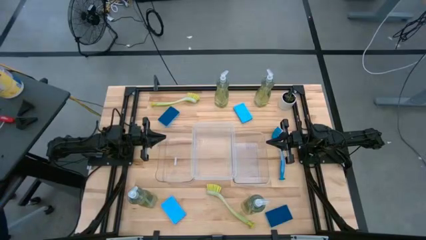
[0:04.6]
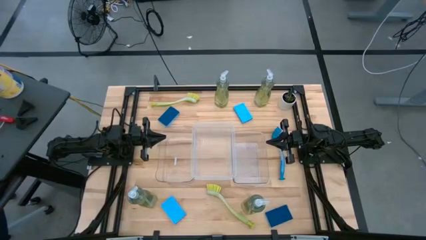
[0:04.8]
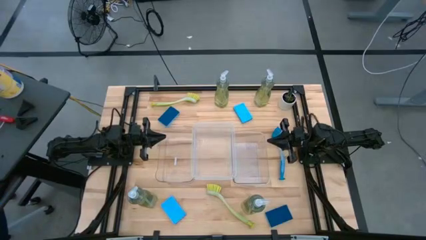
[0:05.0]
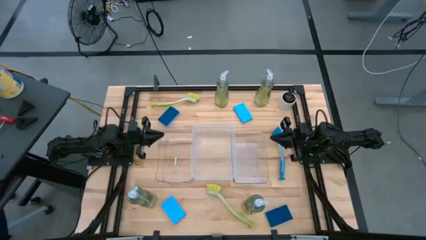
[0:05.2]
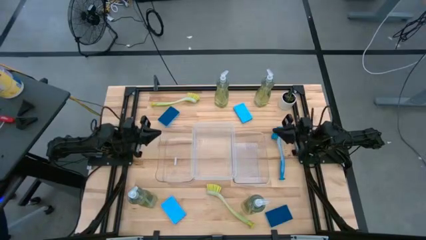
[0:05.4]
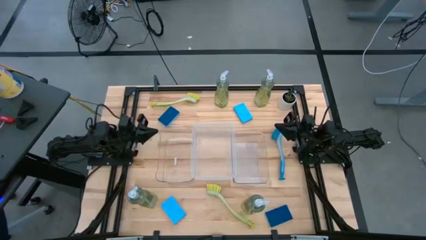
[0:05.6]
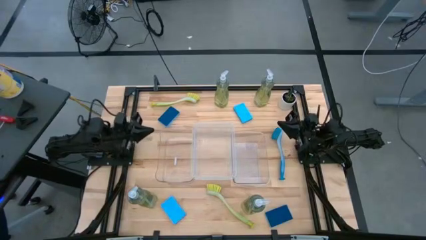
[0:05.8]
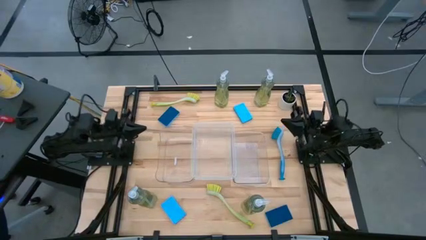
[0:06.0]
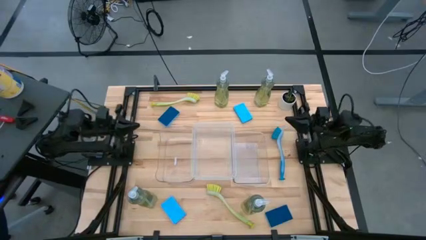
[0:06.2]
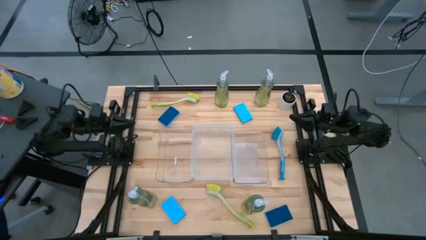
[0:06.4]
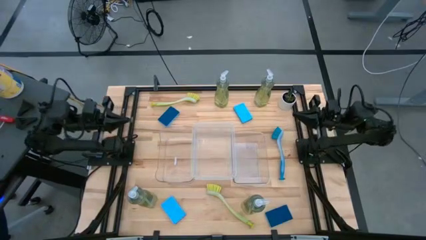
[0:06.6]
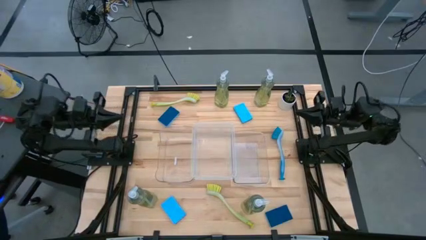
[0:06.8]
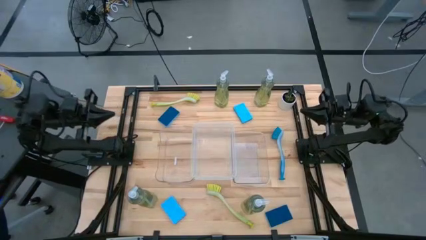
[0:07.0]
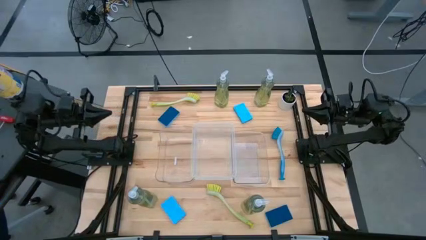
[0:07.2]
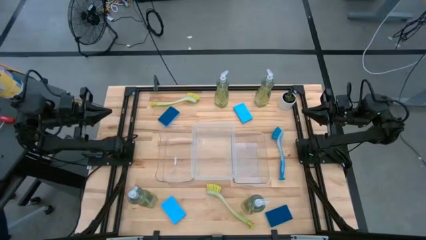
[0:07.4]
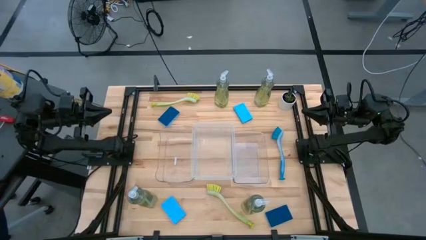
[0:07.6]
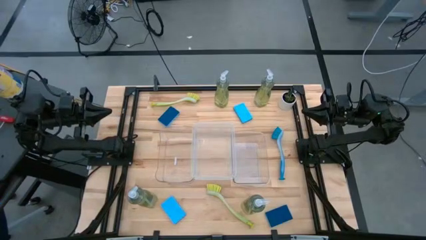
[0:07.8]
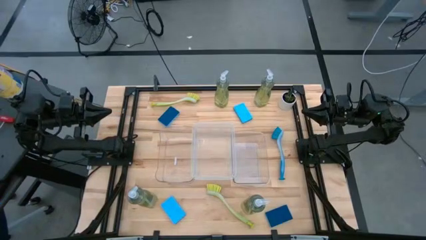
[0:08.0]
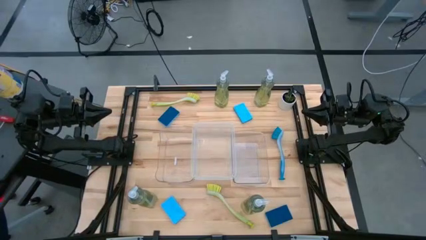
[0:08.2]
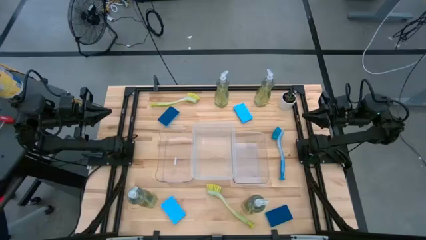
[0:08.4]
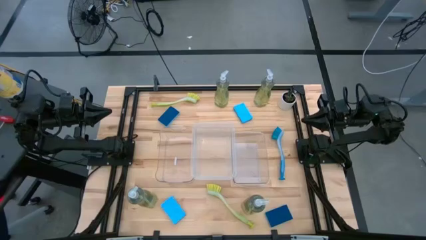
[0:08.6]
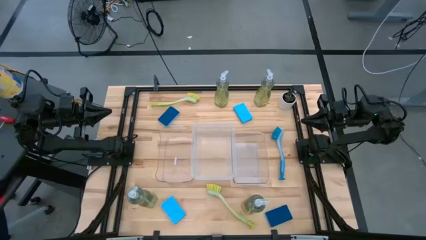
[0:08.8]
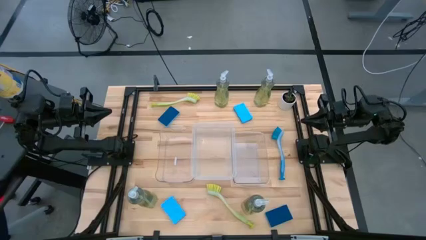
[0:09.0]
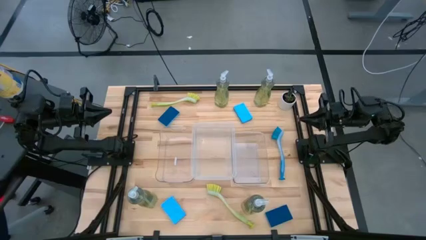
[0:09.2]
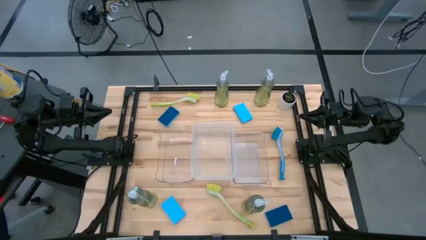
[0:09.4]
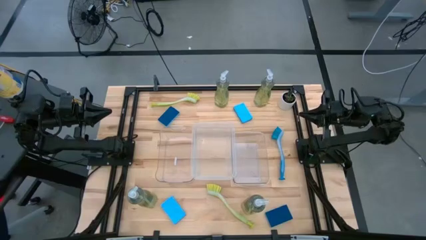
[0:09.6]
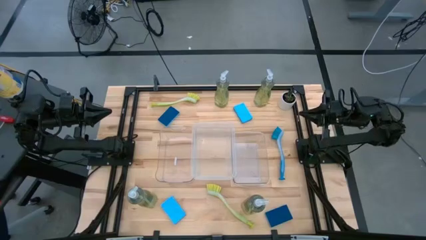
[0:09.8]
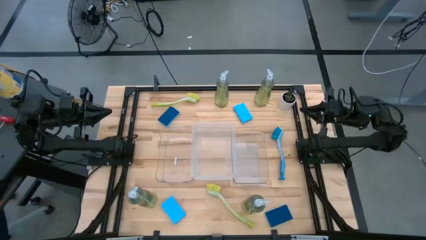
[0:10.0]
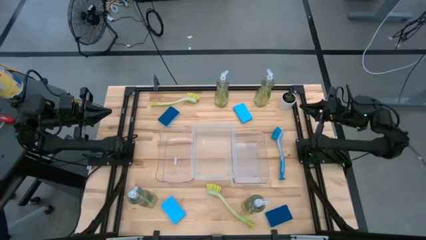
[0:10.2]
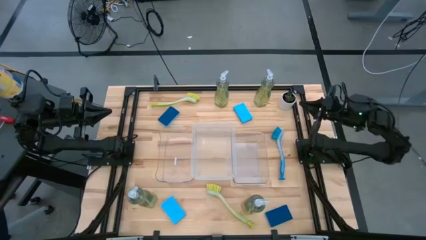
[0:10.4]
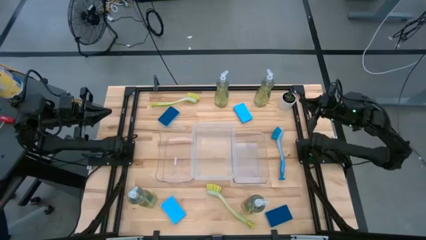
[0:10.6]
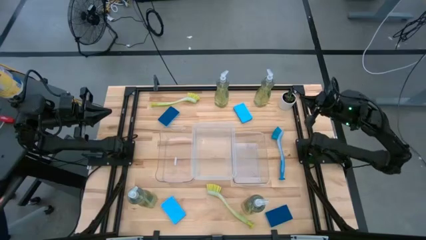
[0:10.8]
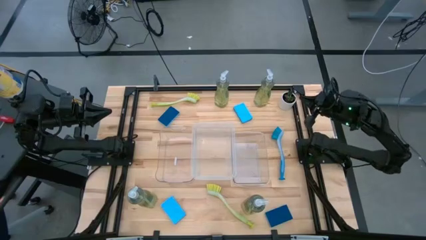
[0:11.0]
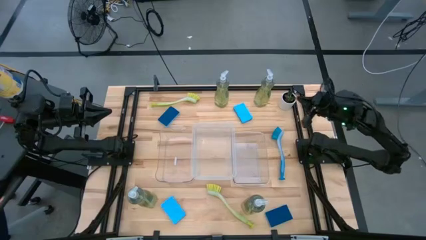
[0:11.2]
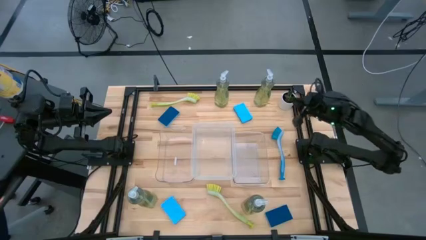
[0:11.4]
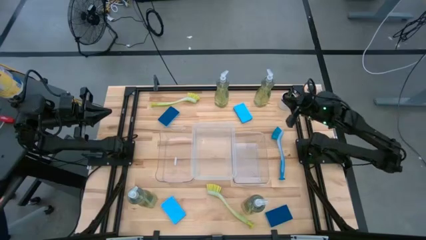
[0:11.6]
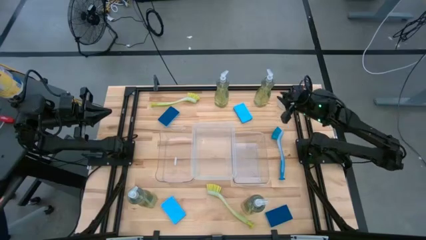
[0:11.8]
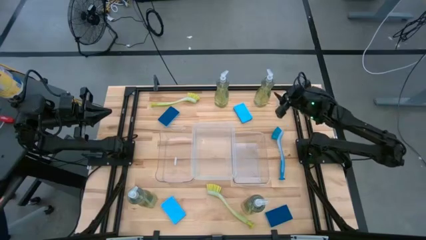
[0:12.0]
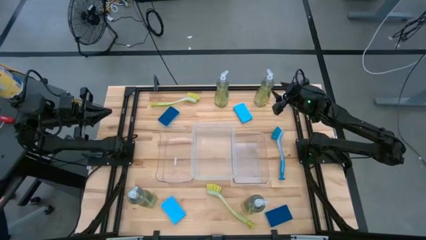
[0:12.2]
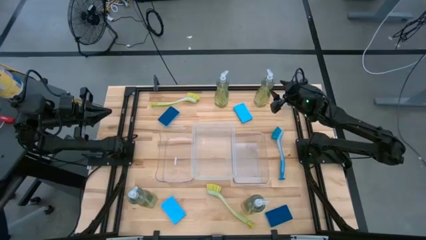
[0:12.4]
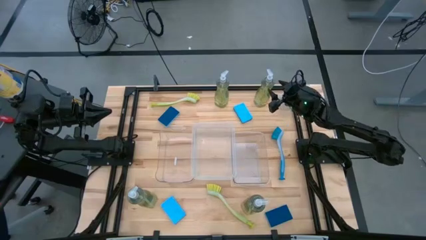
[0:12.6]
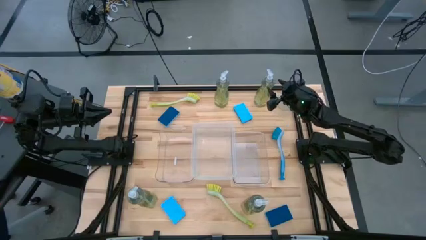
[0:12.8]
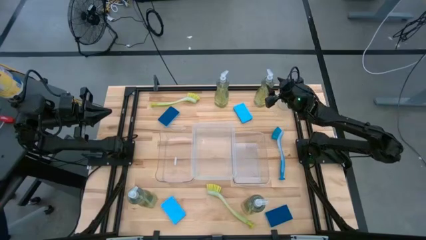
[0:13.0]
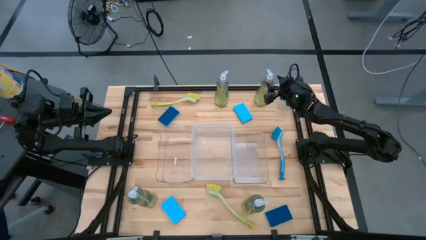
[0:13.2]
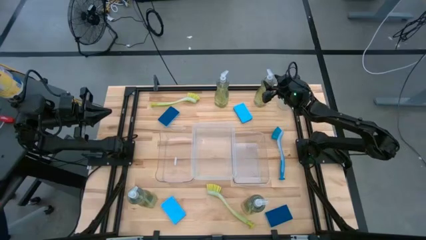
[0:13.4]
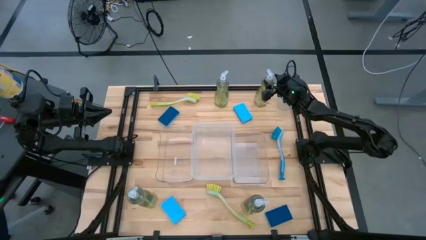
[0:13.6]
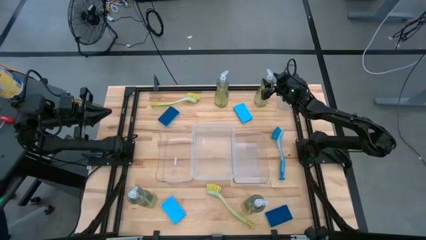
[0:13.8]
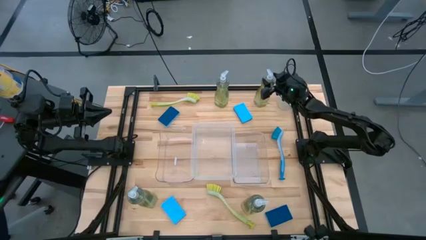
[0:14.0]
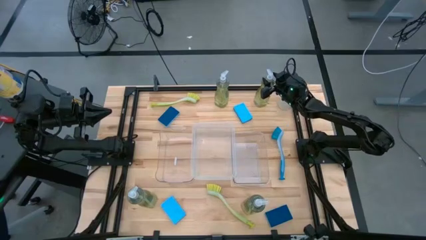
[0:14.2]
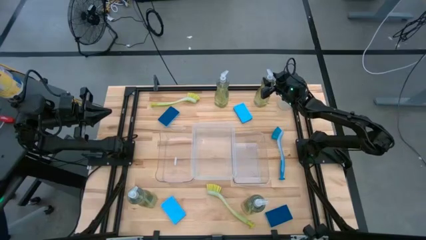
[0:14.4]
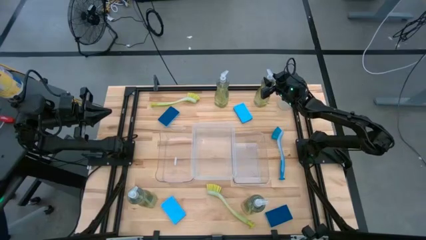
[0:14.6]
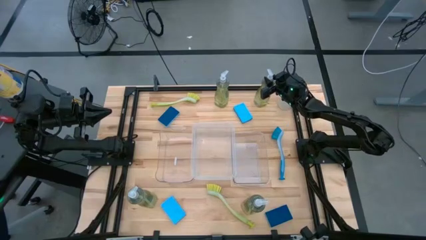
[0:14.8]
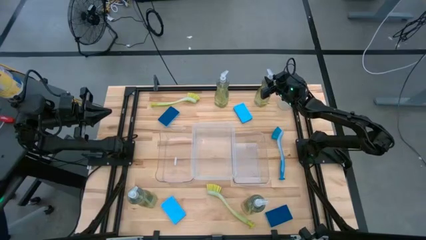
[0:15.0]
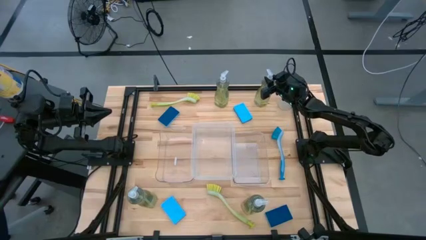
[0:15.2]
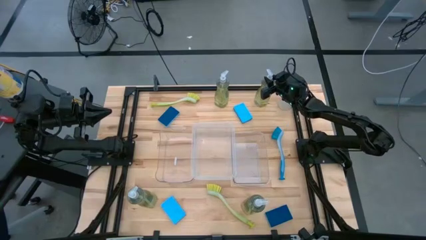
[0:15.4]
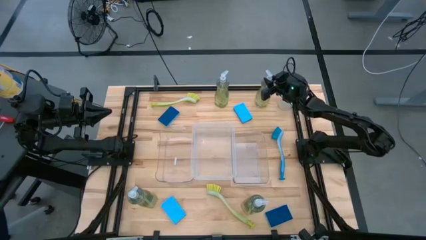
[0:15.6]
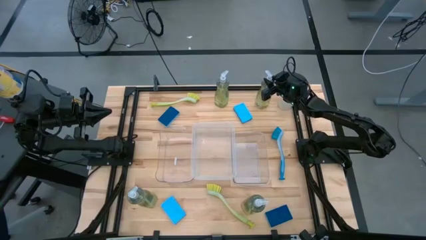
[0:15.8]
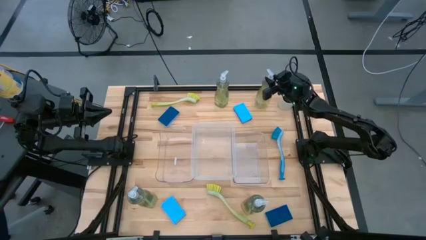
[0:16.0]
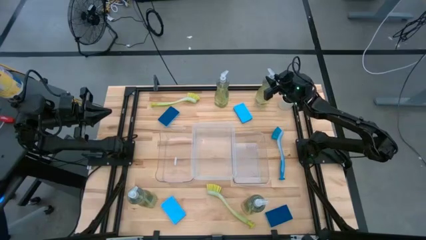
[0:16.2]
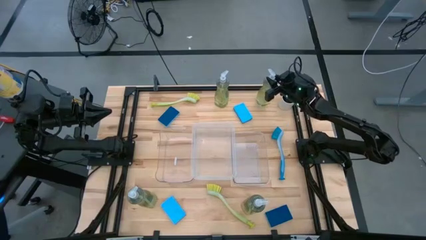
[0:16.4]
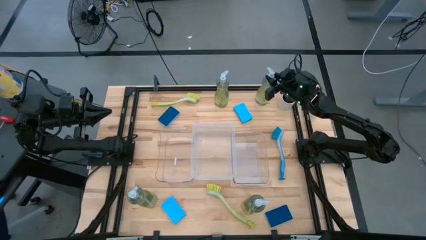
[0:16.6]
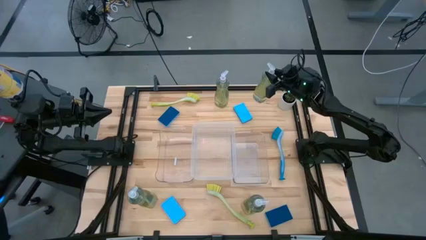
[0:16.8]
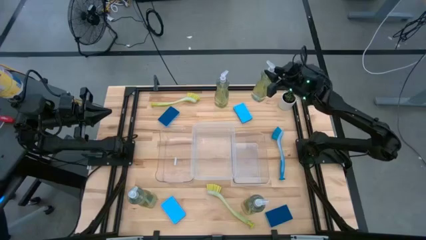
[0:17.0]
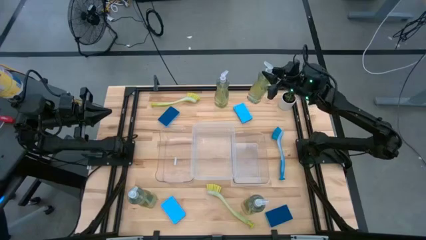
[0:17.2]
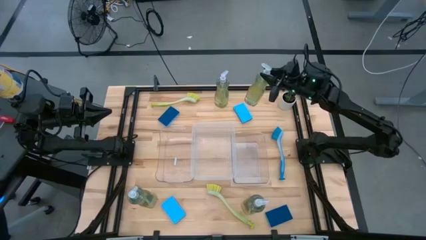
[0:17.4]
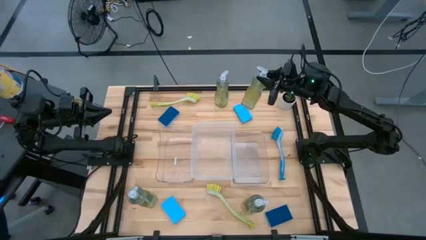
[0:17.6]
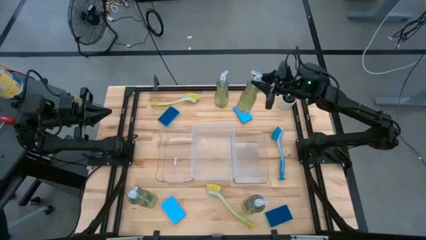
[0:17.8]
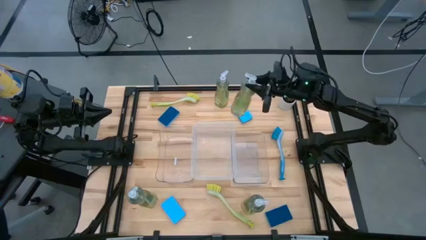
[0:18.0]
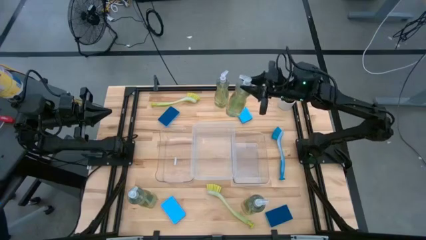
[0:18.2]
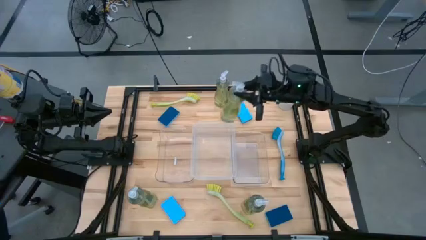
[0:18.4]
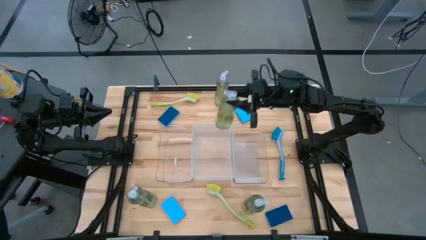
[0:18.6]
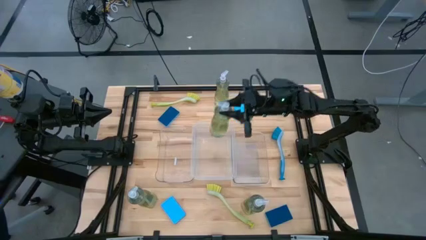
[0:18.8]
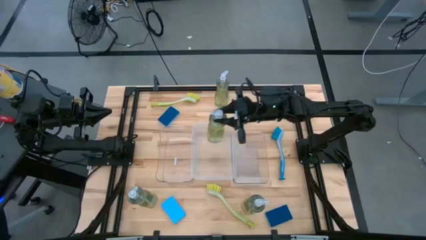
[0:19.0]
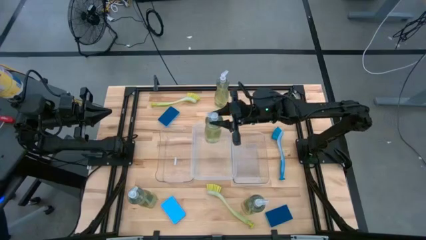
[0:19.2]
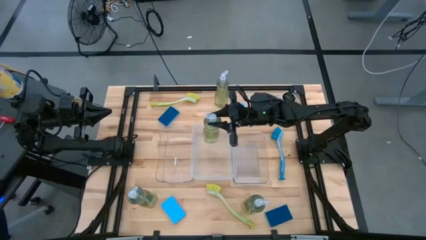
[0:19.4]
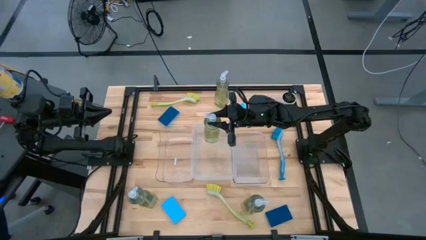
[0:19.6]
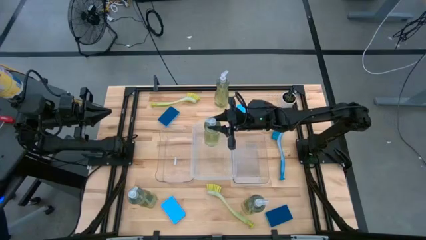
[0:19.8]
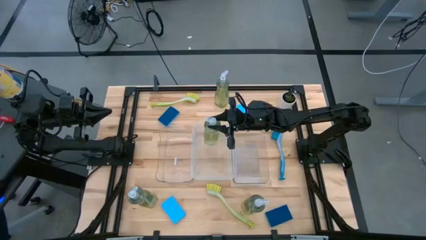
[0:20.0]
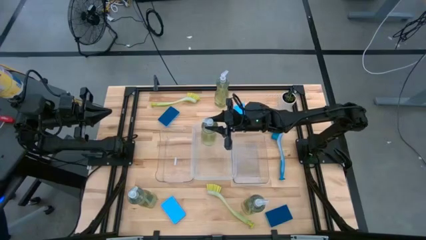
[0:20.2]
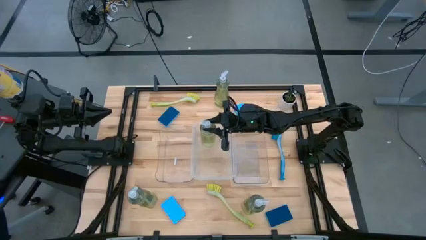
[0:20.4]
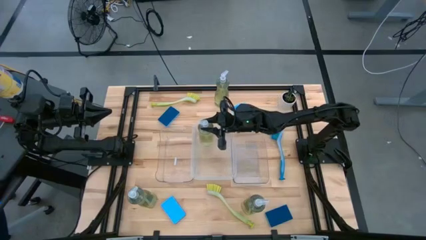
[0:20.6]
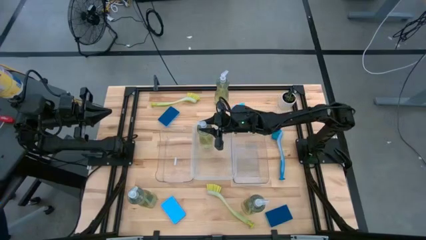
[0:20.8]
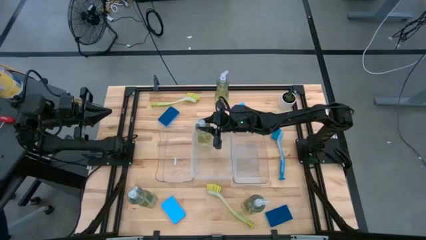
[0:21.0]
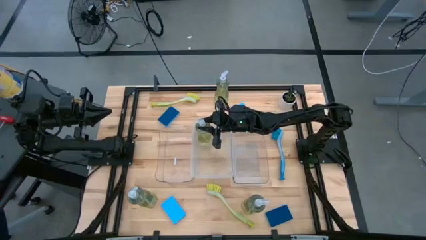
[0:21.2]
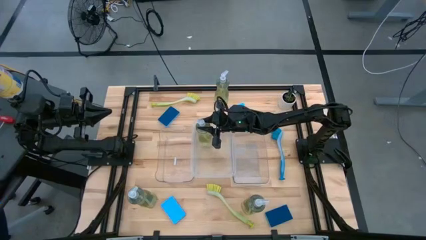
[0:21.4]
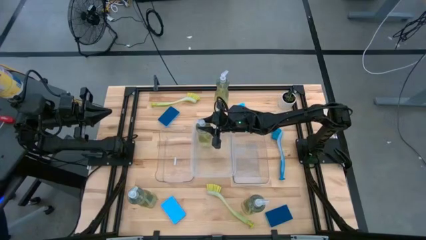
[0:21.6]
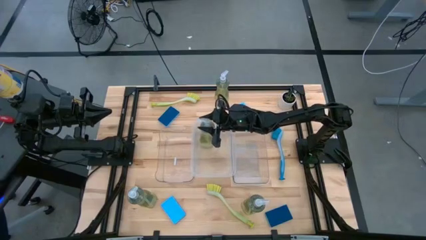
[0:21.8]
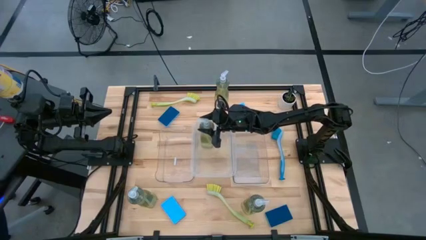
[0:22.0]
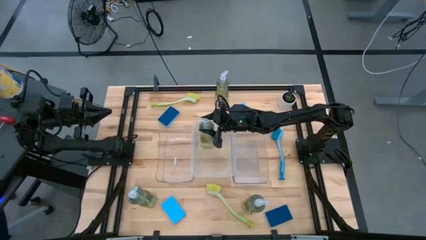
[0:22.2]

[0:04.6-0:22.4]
Task: Pick & Place Kitchen Sink Supplies
Put the transparent dishwashing liquid dispenser into the middle transparent bin
